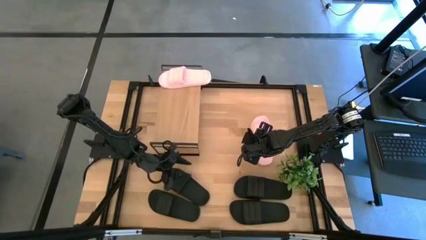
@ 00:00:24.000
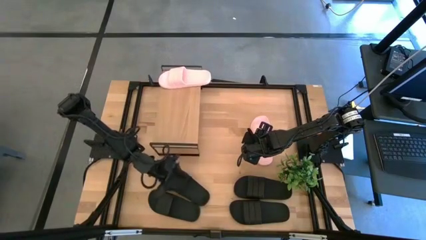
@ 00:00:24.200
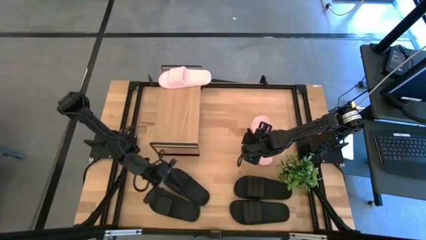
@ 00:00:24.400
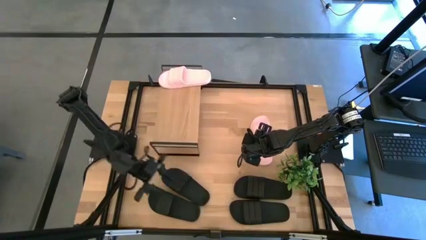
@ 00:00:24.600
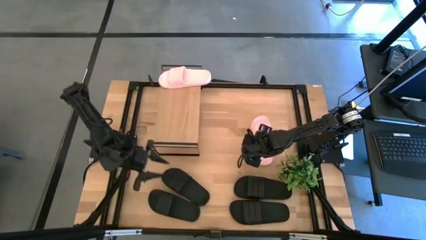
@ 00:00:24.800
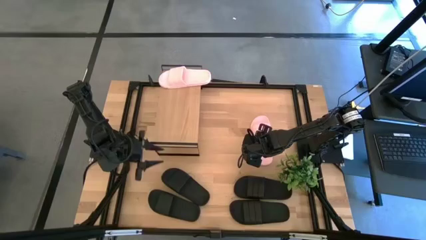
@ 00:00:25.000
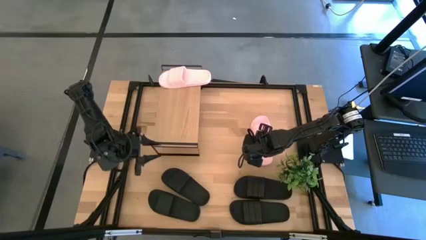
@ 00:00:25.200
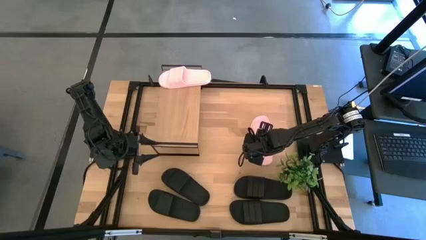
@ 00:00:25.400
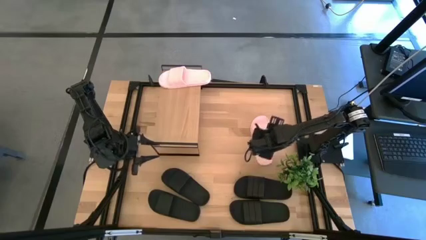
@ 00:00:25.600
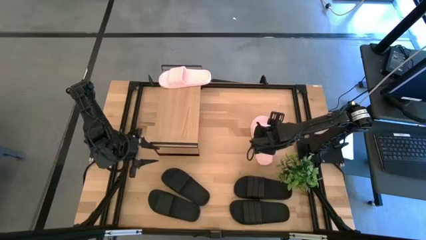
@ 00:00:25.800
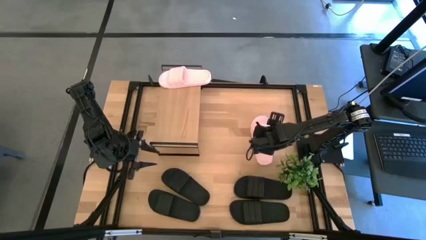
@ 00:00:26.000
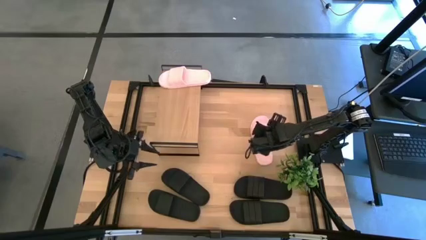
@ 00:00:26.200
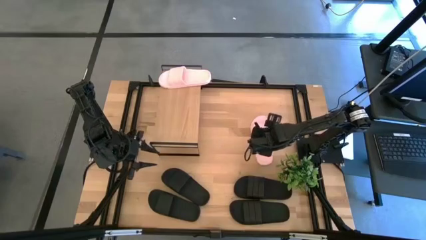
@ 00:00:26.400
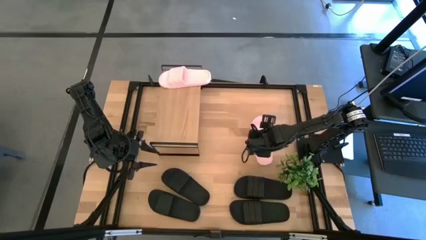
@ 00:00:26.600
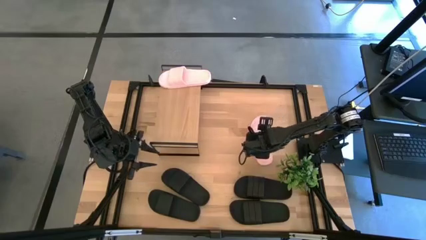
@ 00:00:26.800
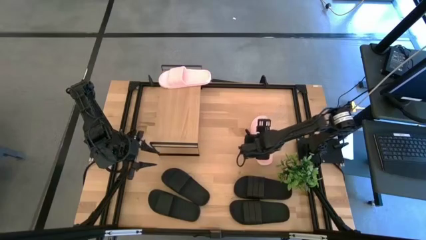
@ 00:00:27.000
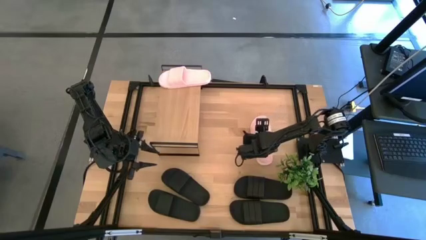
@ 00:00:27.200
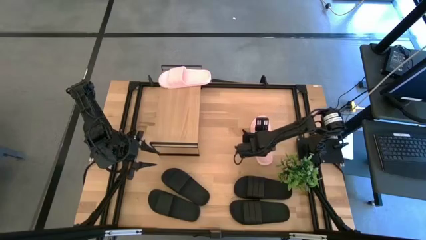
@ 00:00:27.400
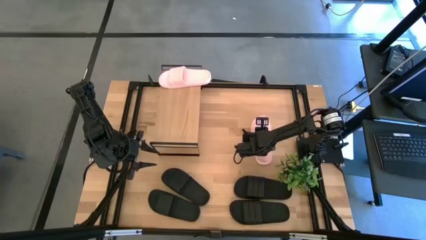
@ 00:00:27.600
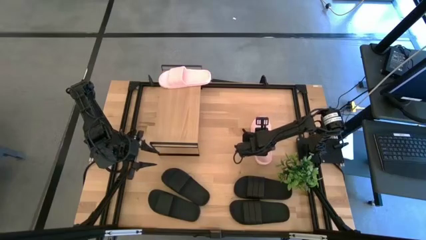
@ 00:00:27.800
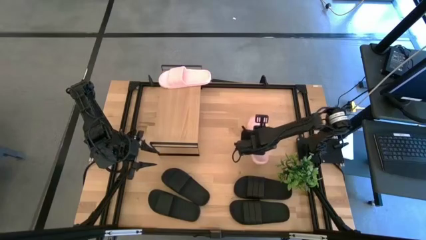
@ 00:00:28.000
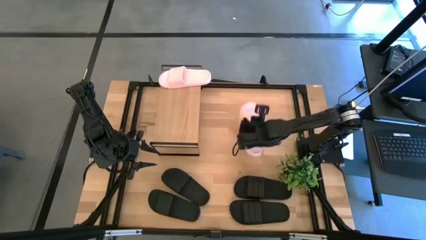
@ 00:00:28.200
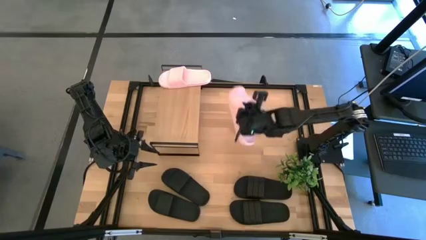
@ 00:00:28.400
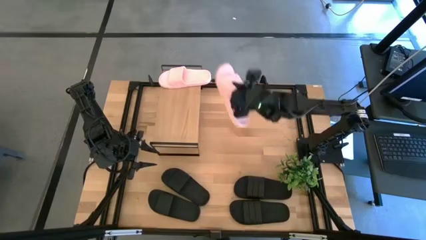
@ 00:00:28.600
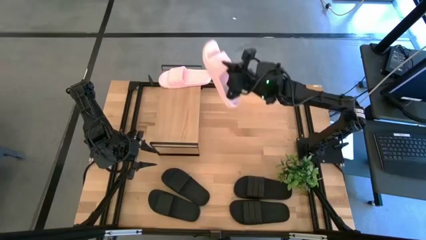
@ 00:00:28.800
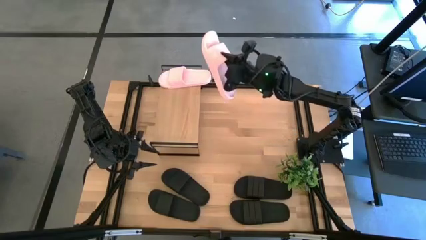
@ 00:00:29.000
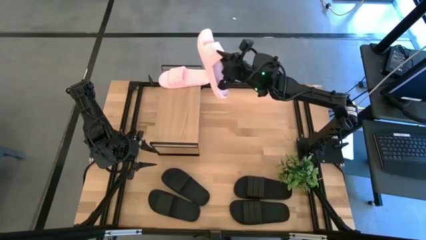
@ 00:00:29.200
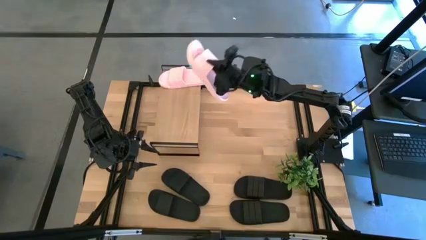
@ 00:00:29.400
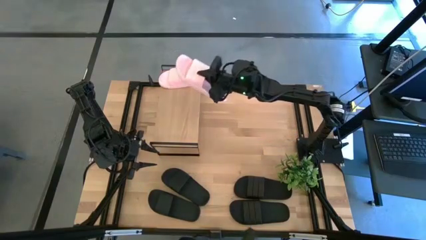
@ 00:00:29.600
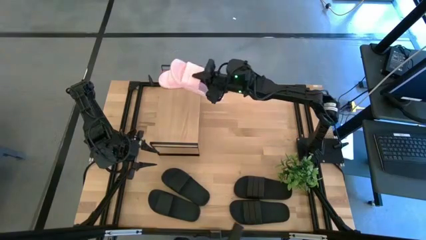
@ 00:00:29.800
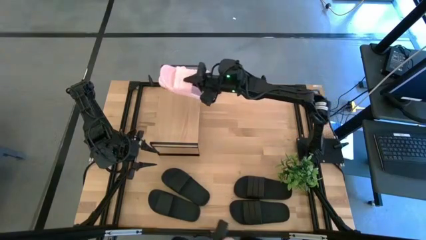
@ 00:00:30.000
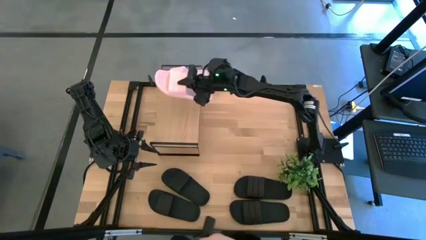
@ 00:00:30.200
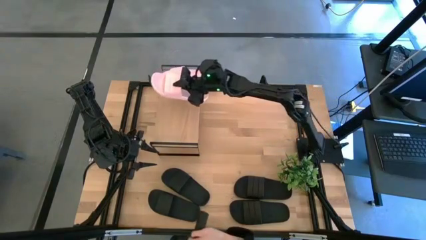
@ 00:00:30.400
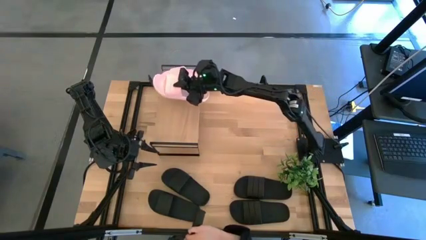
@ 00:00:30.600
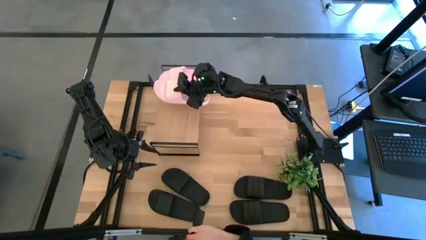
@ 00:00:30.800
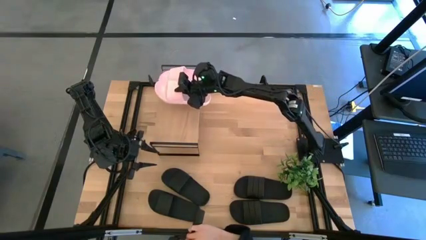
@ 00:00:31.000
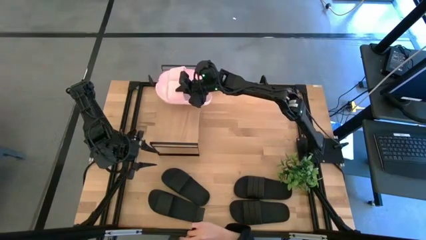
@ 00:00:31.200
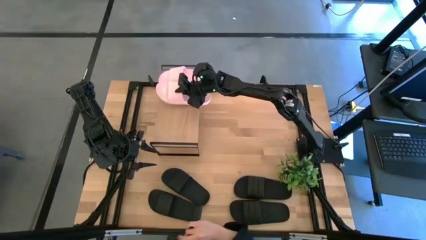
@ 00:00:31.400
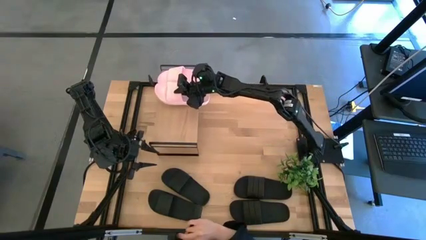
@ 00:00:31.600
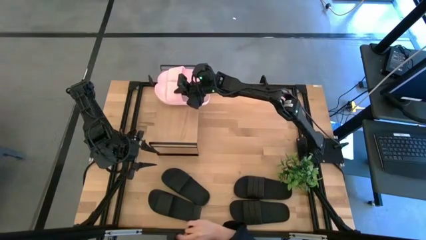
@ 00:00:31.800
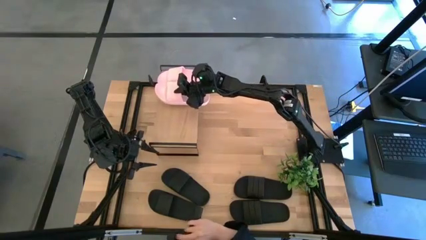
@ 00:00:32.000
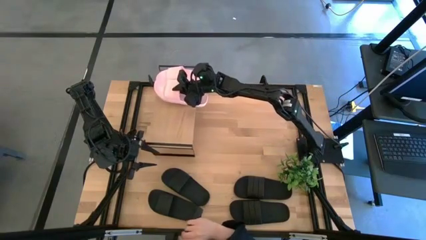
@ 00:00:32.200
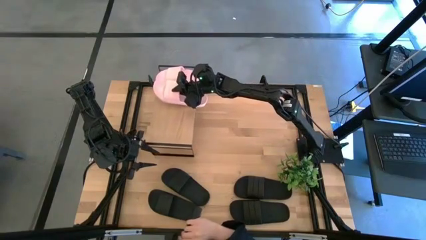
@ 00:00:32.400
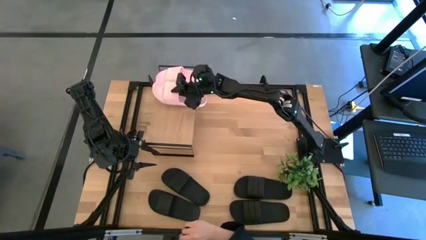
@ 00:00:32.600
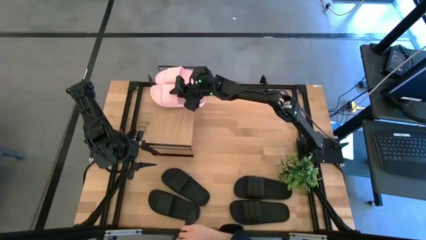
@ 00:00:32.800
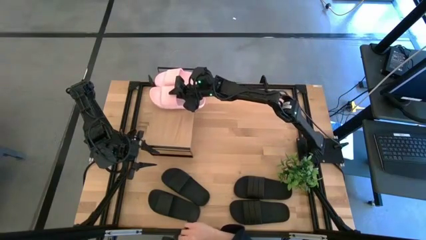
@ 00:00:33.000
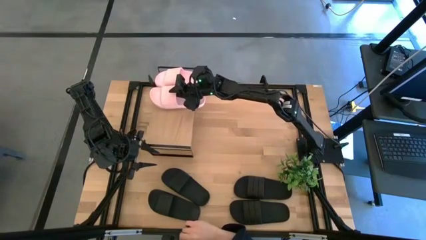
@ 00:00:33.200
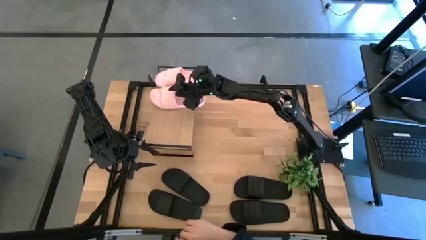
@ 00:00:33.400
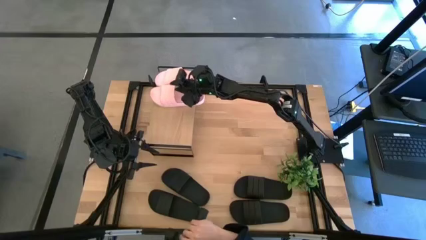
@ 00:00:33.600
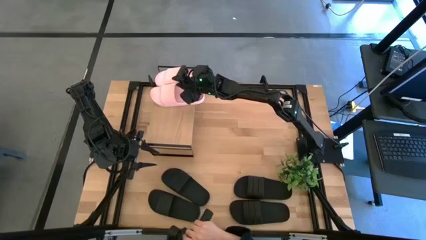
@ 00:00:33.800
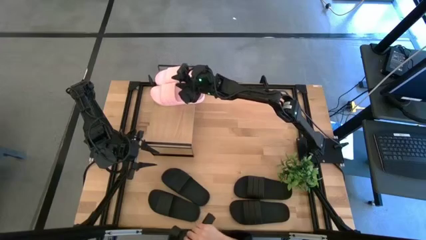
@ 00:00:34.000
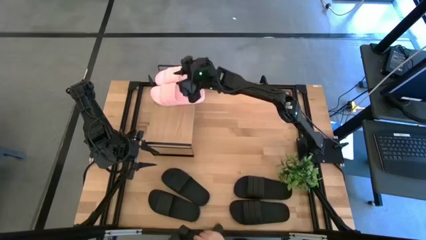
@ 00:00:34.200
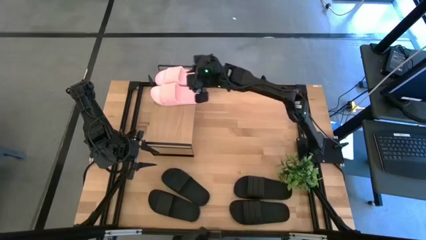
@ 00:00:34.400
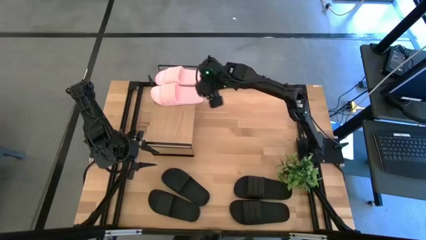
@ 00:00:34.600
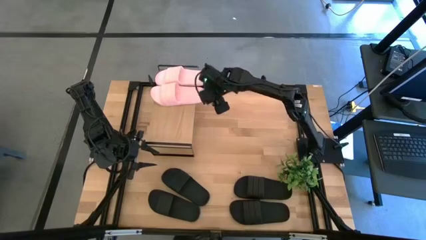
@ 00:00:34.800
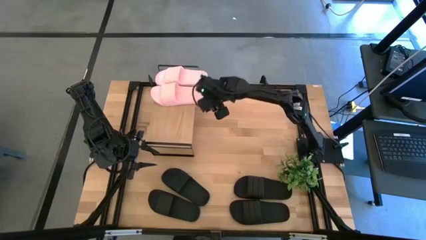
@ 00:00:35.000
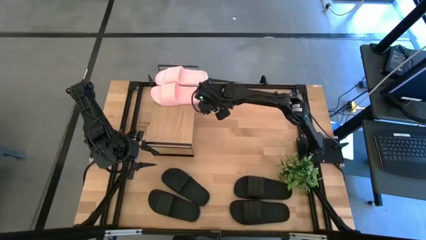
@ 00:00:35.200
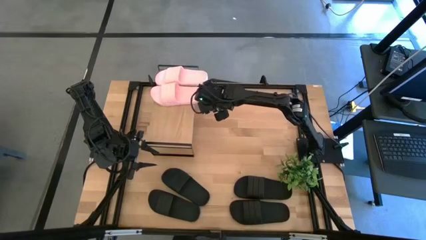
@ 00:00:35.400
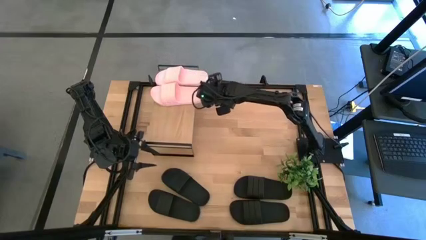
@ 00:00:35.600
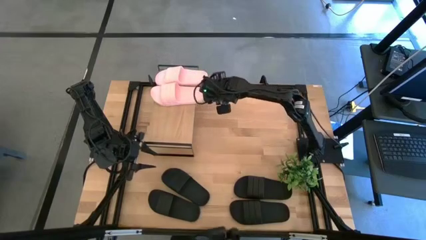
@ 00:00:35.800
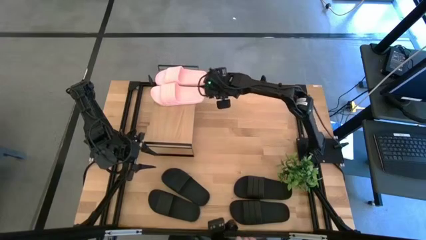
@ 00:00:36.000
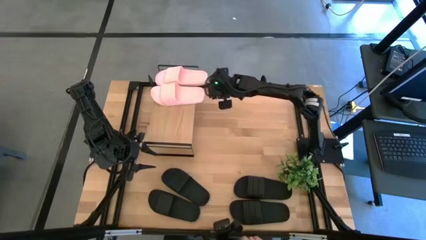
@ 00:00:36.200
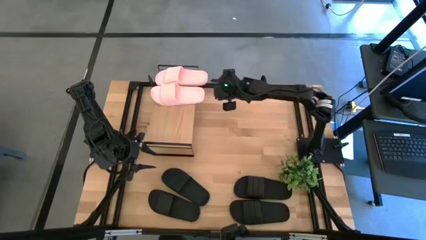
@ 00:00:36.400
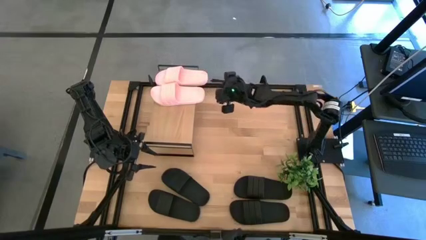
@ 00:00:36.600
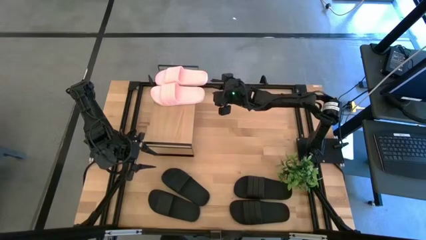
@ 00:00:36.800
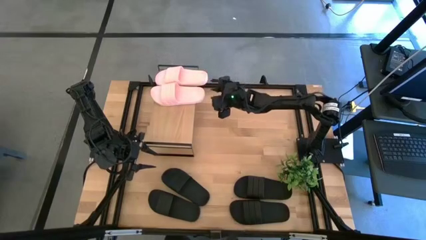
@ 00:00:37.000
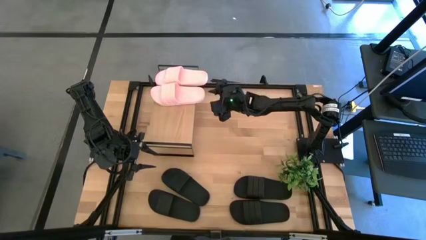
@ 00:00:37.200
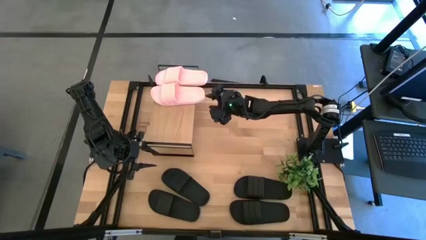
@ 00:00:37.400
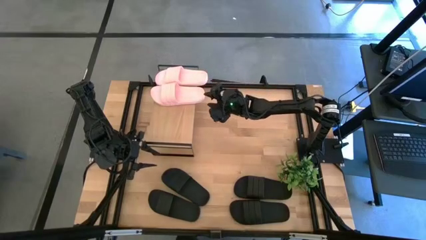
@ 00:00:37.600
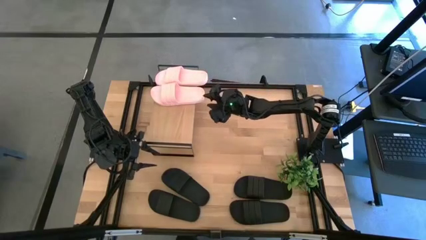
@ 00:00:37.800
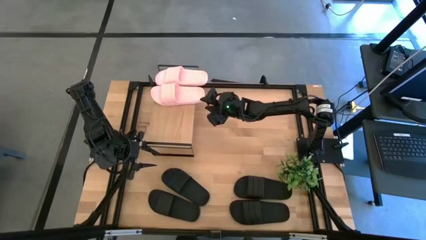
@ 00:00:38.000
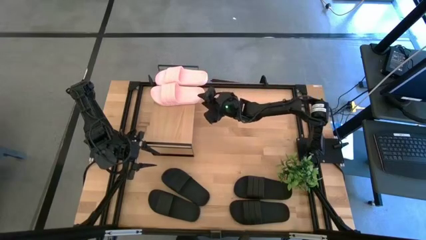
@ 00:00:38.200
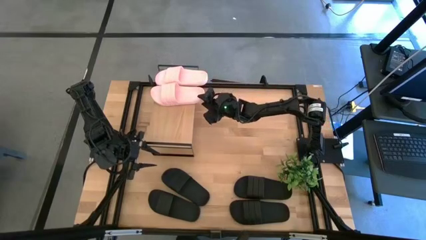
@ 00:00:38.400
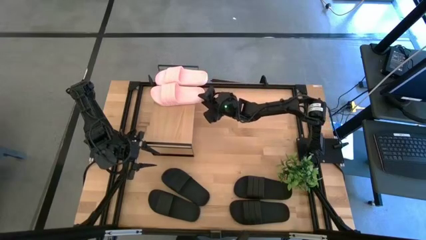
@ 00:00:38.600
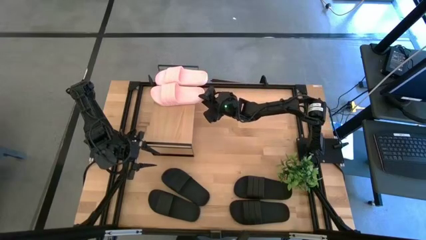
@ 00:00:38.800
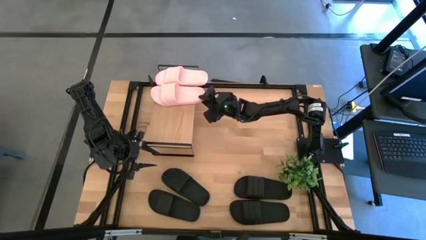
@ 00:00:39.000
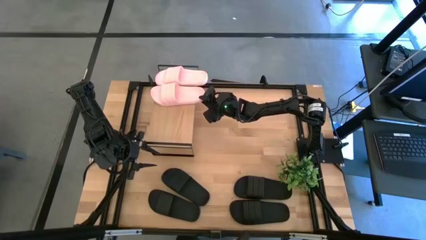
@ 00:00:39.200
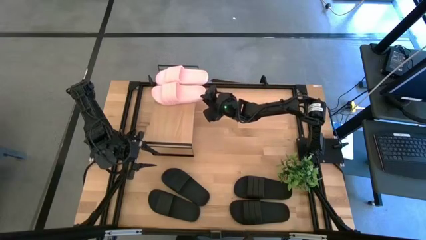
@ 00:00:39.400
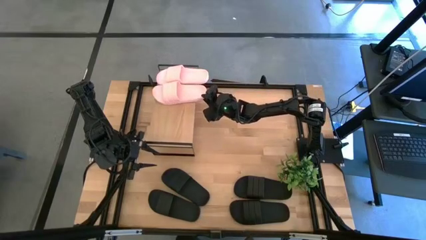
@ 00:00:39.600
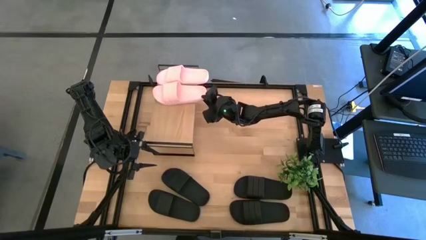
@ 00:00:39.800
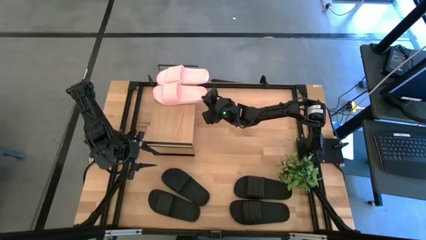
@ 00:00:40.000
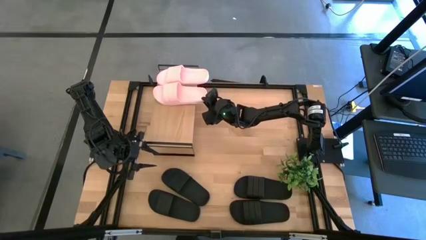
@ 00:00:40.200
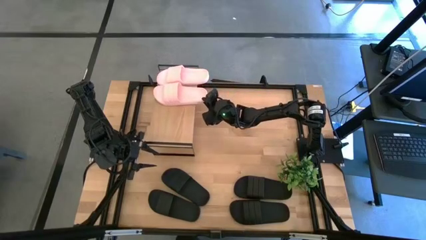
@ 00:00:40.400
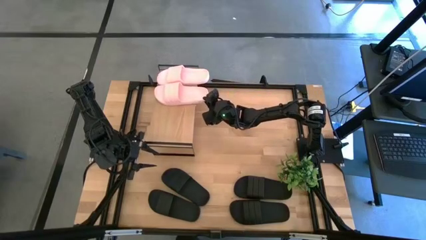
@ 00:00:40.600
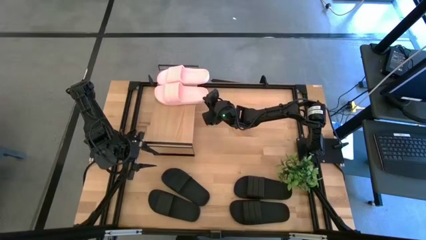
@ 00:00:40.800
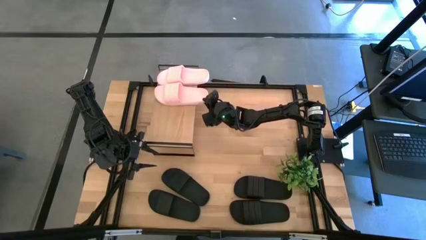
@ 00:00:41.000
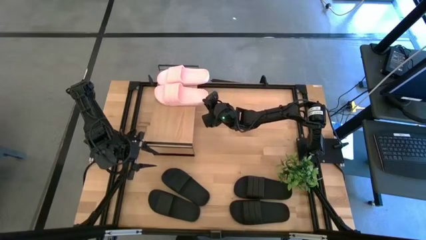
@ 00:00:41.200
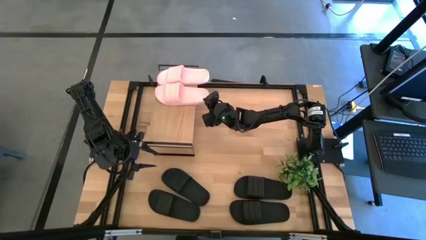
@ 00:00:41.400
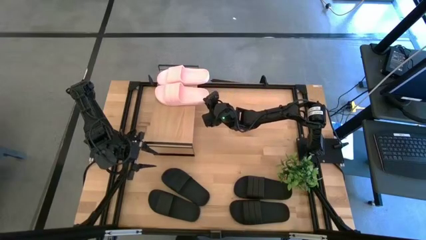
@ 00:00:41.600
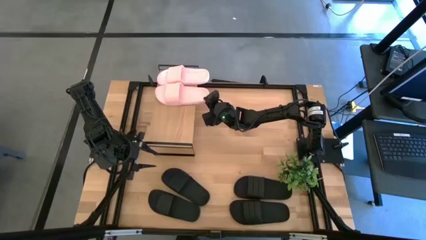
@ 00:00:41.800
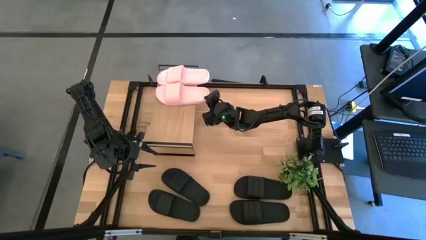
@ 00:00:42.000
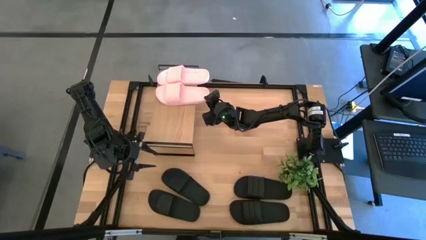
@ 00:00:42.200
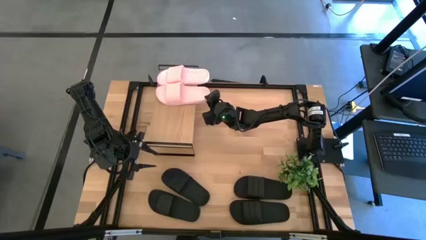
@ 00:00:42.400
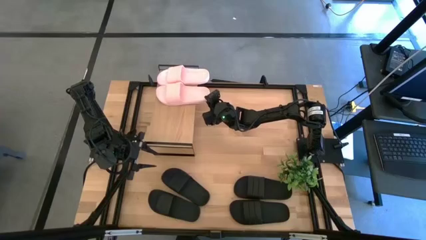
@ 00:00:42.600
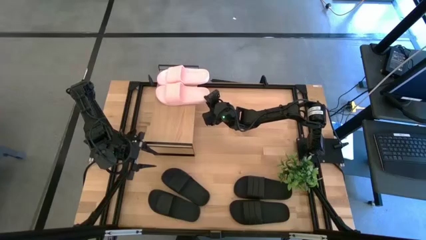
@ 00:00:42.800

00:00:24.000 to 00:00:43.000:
Task: Pick and place slides into the shelf
Put the pink slide on the shelf
